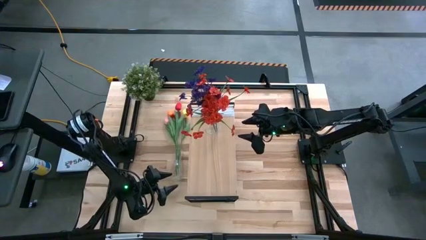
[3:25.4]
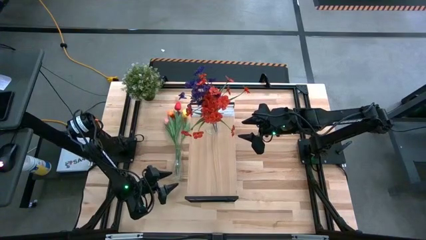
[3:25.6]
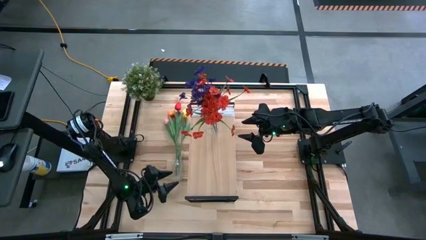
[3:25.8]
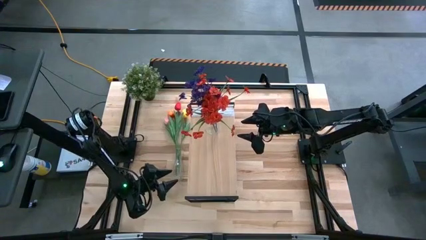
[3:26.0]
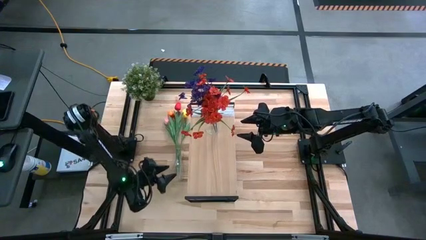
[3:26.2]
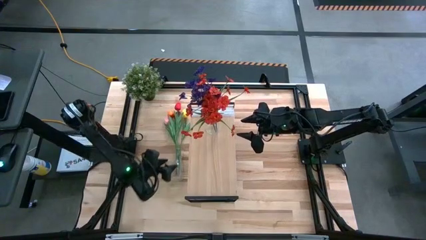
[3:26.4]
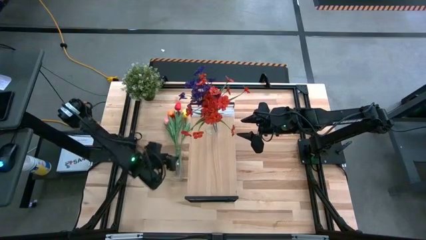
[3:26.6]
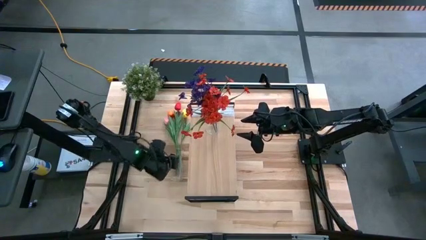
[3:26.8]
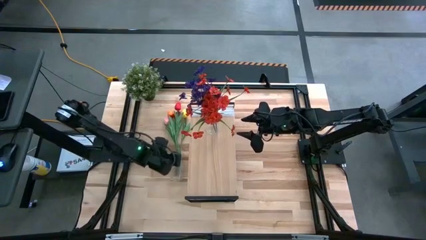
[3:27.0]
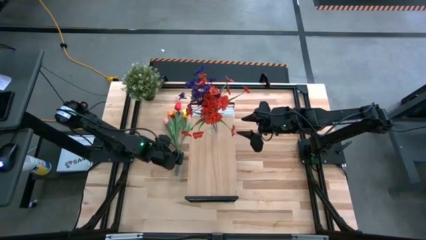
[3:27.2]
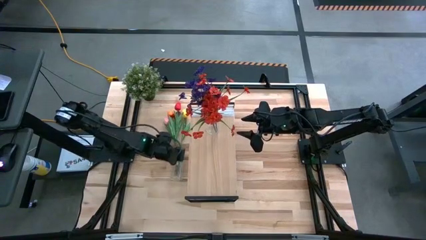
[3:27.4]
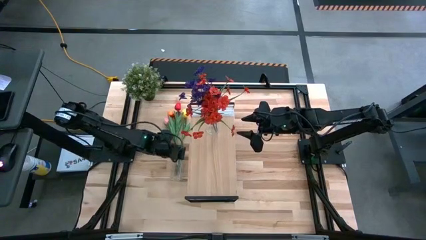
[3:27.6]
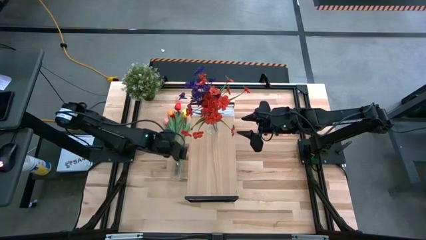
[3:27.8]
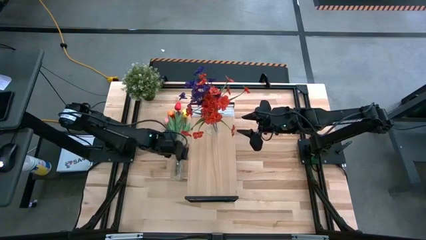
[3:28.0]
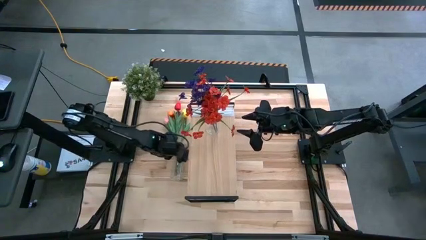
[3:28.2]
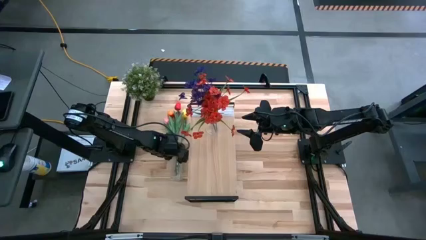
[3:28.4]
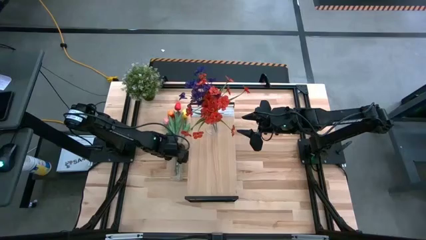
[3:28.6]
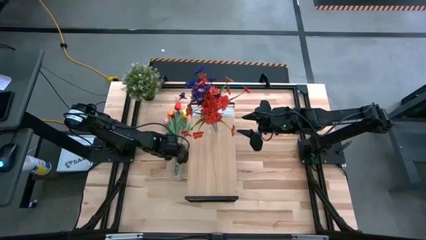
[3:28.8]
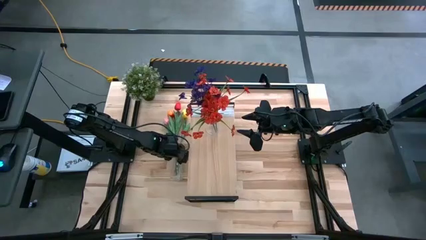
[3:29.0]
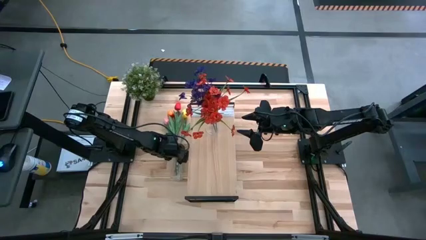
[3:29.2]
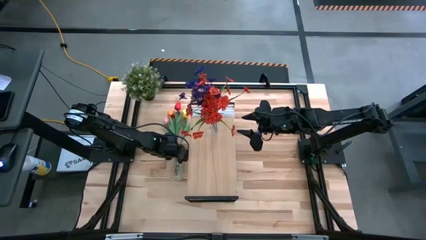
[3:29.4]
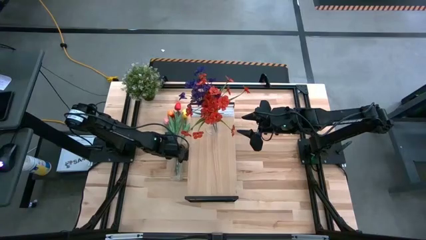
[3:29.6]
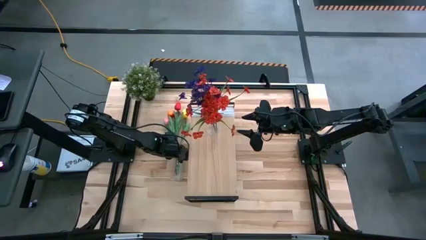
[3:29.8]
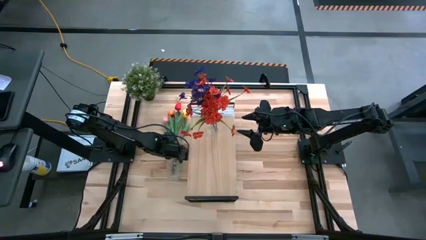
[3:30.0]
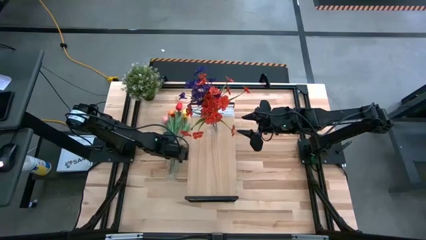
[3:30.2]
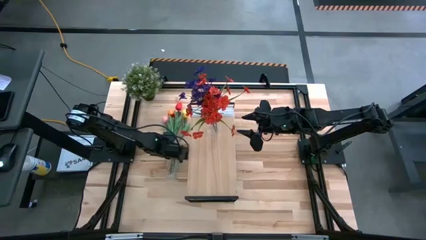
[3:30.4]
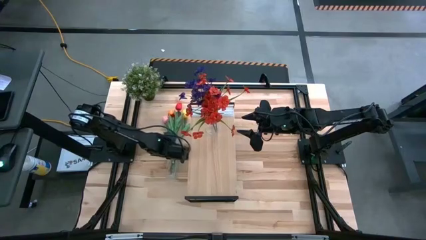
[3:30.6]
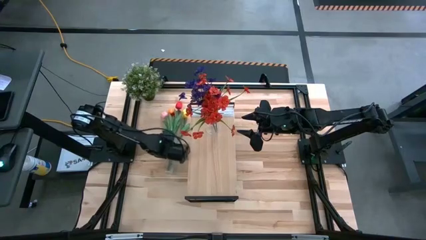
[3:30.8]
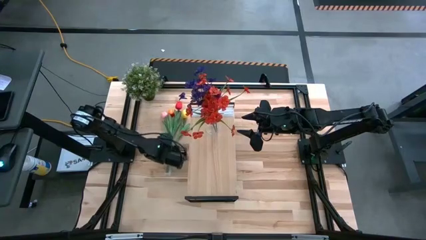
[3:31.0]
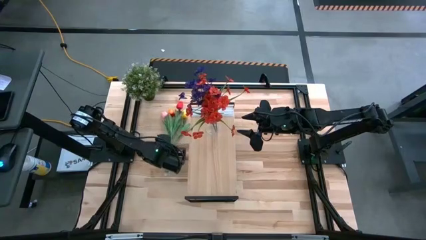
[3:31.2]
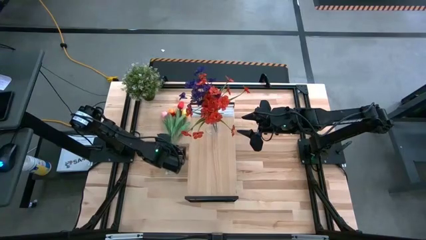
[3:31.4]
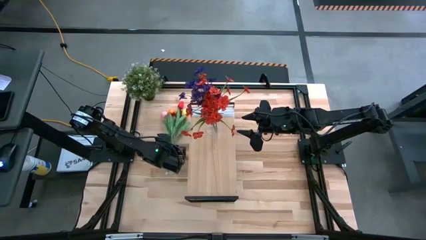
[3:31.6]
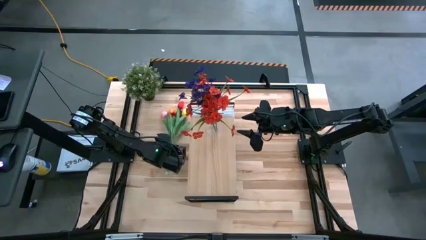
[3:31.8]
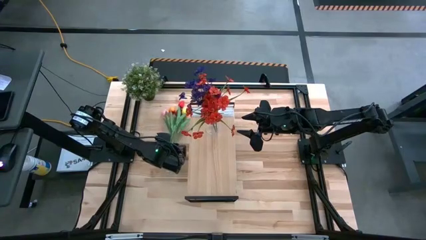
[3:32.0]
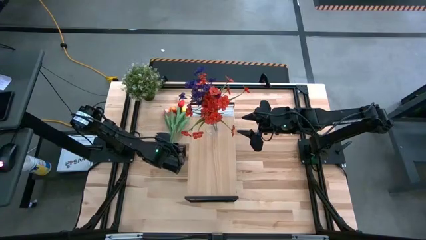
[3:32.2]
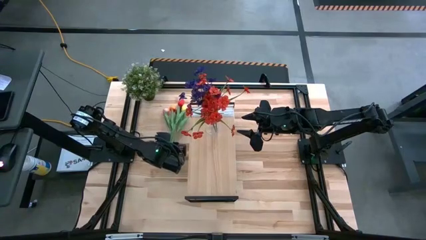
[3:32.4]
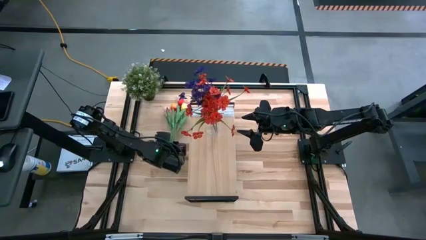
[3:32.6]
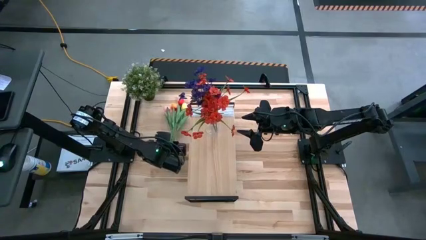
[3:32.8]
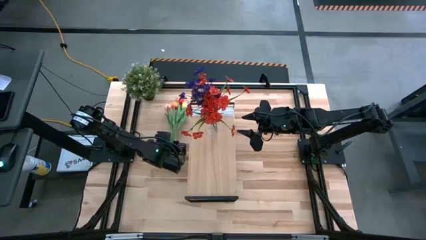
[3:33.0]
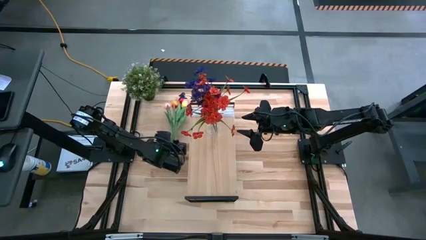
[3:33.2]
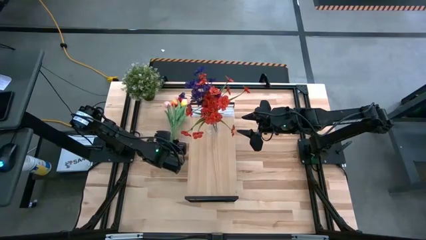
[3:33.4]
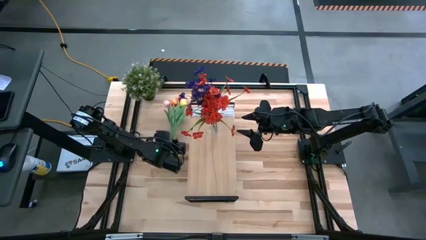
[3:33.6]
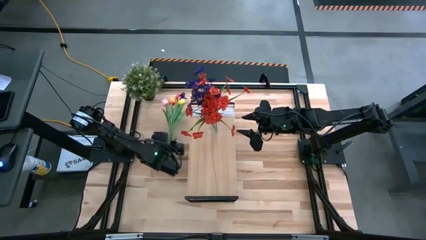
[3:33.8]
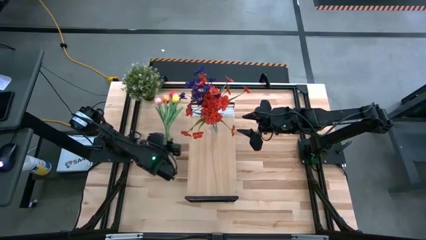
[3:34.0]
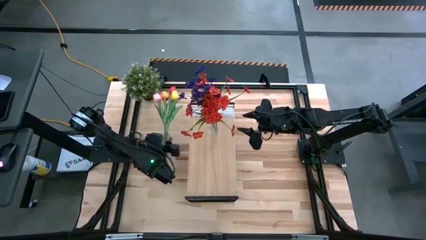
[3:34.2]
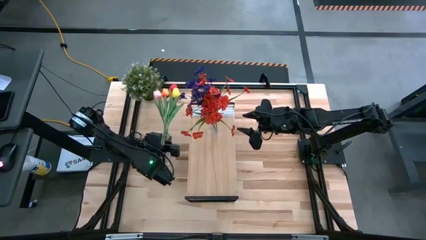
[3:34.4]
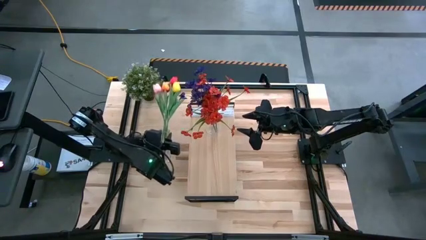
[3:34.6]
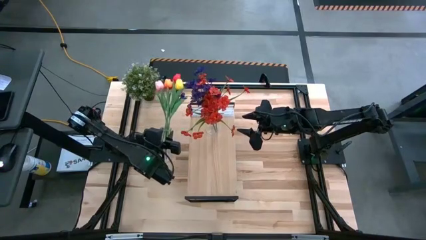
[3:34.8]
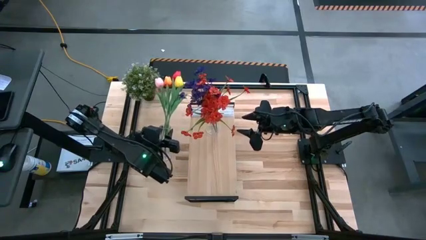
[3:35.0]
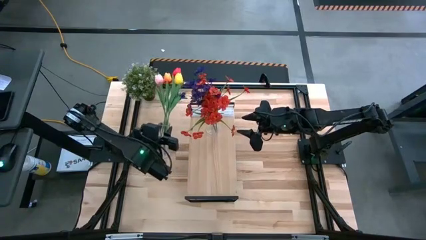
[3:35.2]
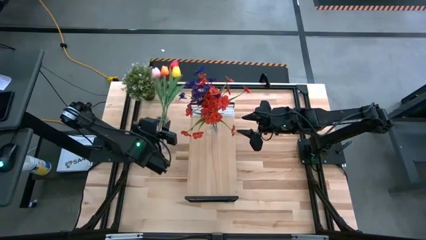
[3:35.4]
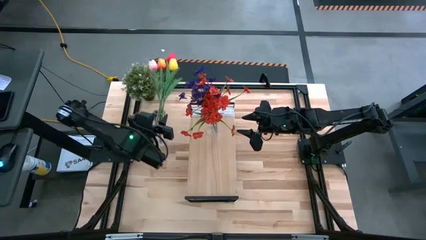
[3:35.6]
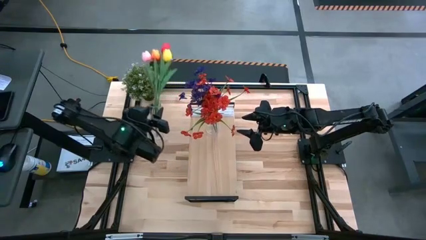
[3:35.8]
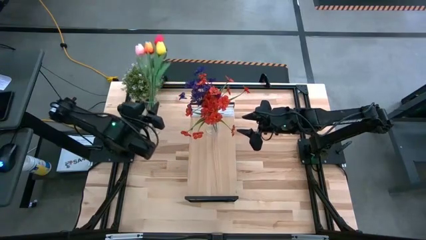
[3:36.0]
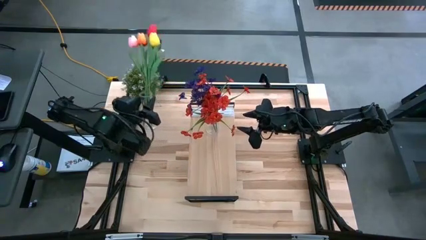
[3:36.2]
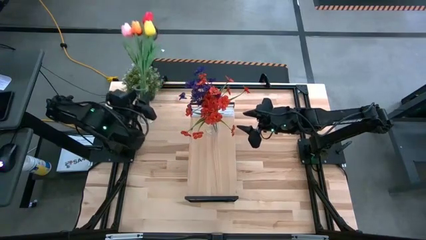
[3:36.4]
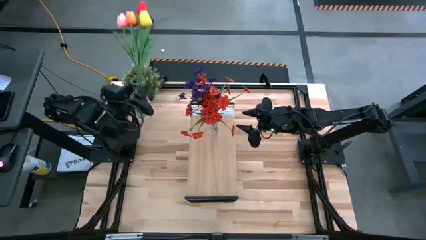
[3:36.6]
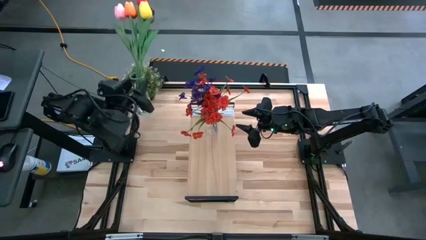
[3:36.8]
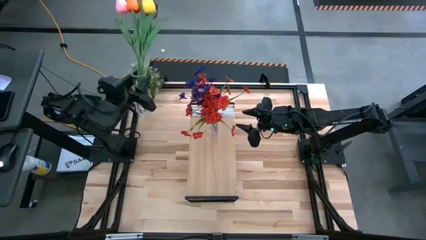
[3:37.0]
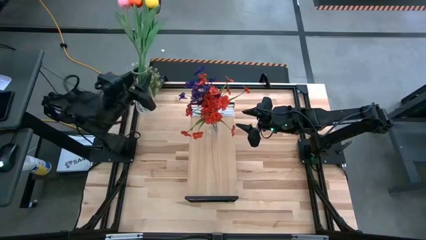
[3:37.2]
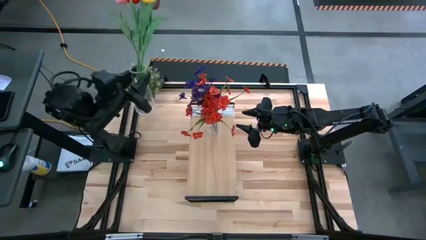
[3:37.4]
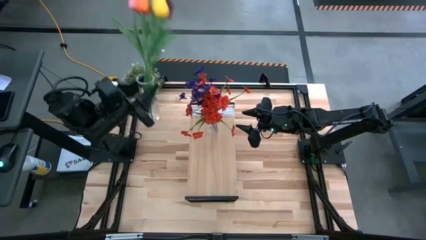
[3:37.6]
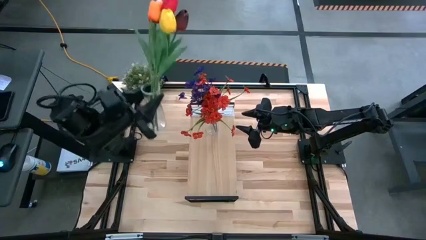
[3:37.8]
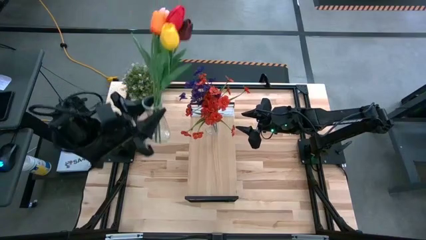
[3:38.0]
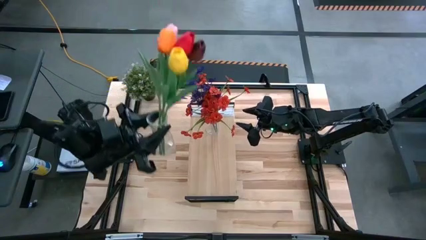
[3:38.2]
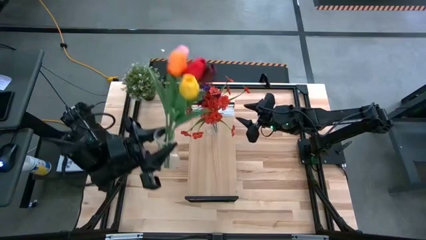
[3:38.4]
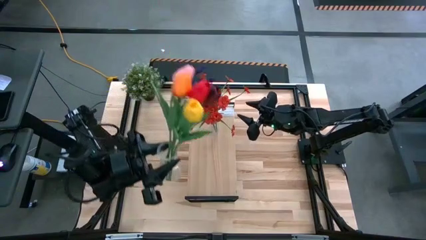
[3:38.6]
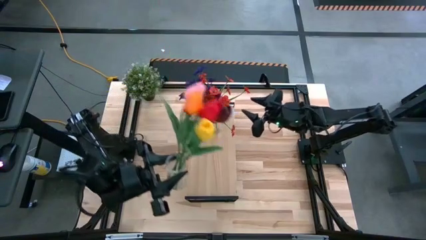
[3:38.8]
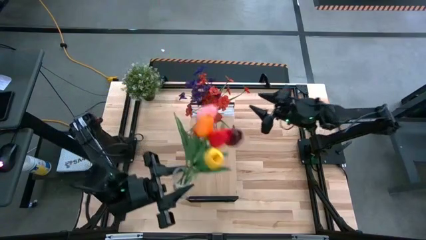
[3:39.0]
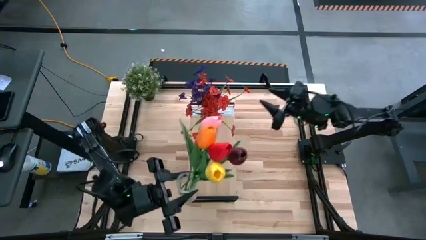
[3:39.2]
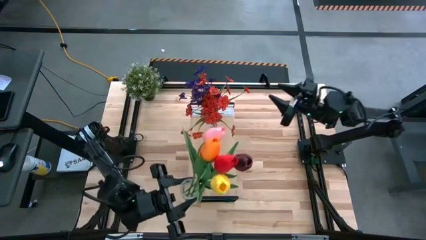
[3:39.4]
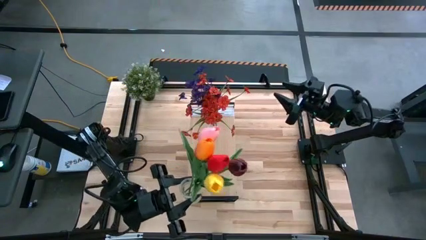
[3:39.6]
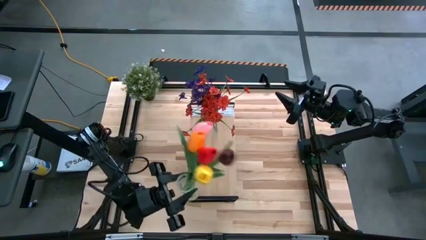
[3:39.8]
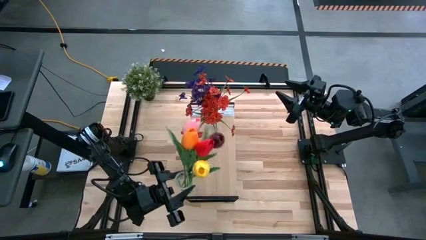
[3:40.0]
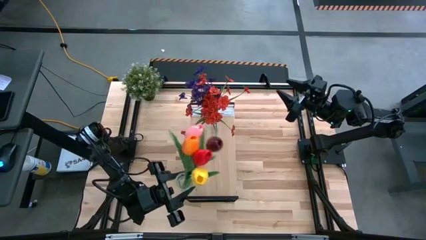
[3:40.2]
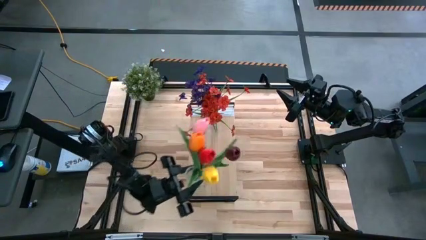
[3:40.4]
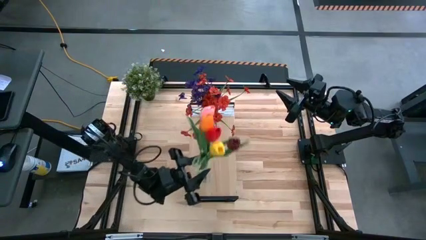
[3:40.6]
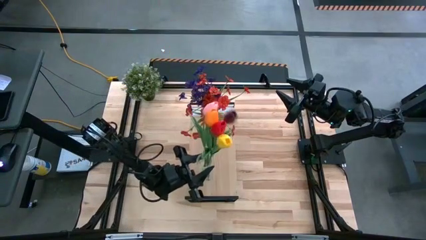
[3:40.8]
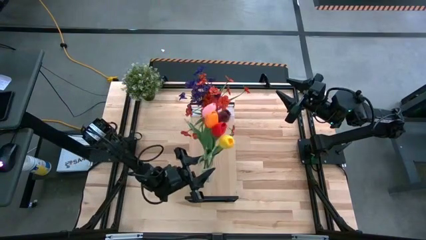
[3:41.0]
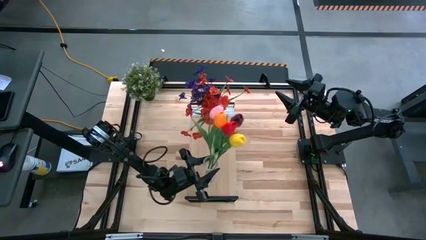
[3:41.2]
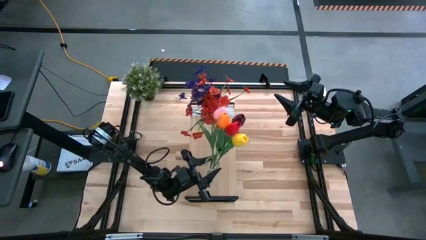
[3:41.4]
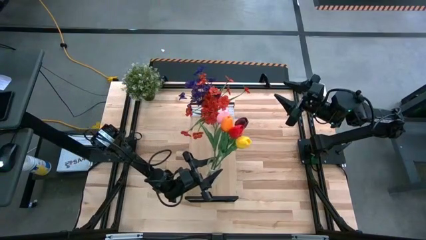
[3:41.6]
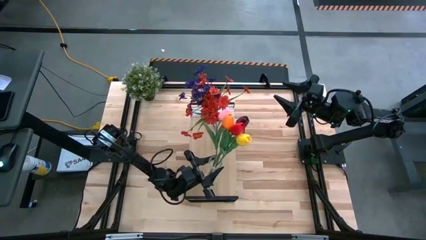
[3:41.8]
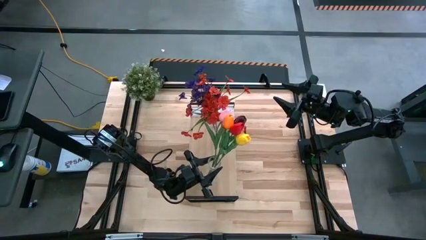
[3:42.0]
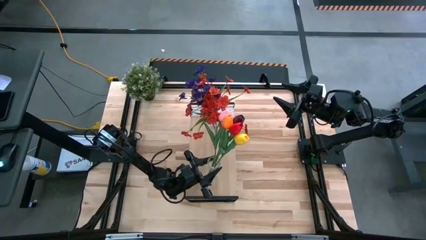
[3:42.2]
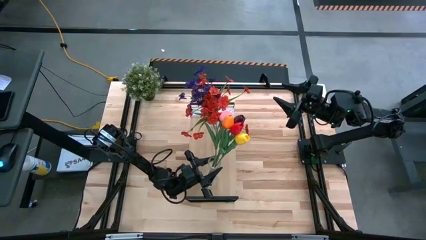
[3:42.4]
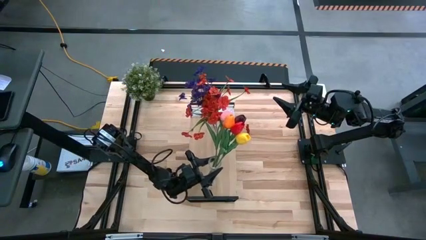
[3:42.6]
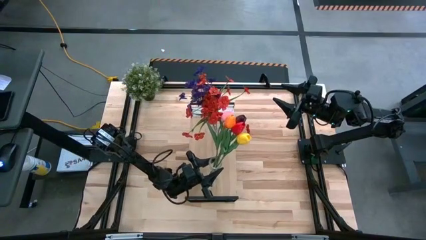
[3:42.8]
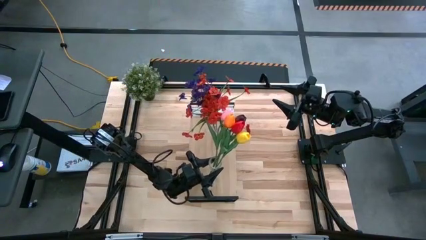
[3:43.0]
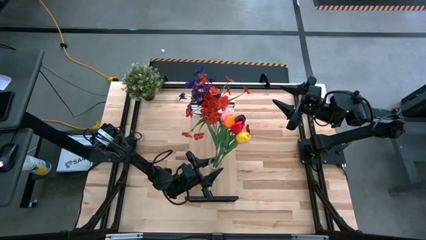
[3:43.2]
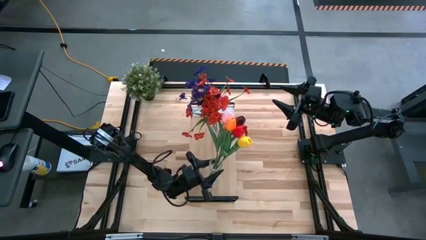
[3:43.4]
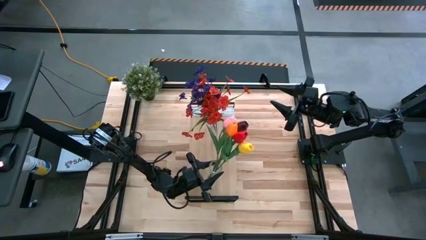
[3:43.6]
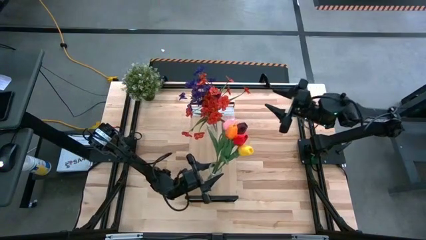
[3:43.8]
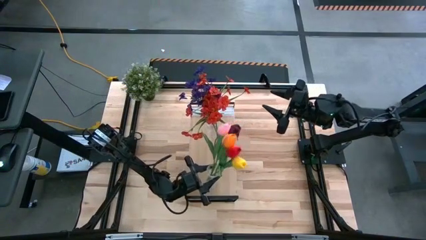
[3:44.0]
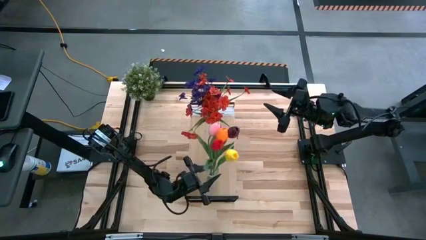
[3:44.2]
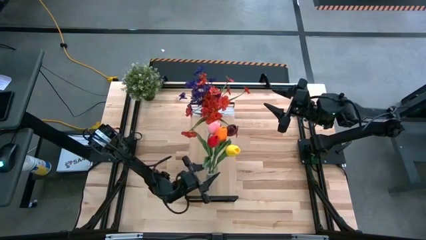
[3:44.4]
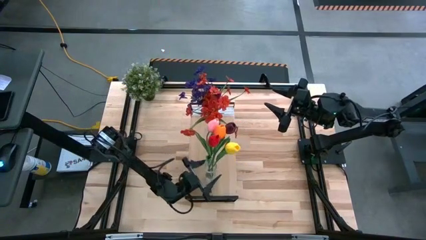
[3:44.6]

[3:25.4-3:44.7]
Task: Pick and place flowers into a vace then onto a shelf
Put the flower vase on the shelf
